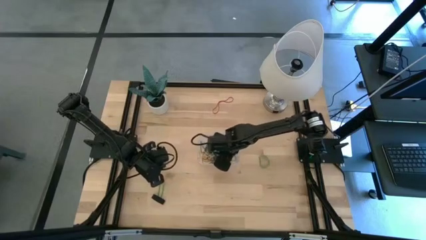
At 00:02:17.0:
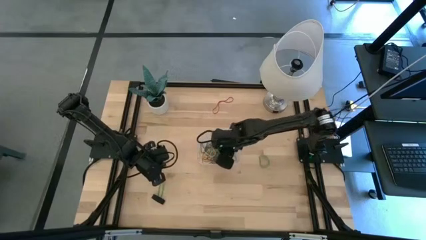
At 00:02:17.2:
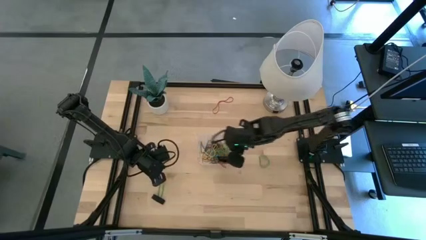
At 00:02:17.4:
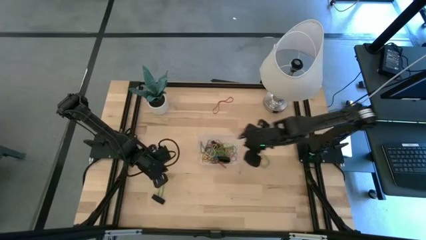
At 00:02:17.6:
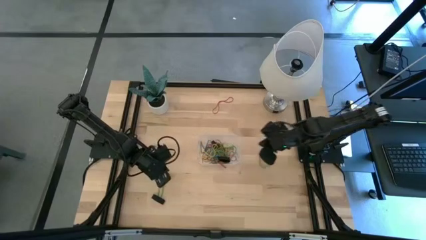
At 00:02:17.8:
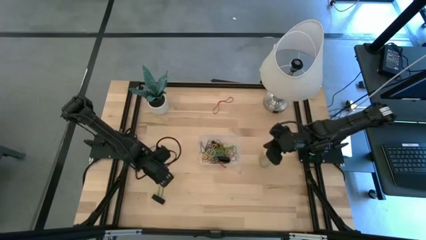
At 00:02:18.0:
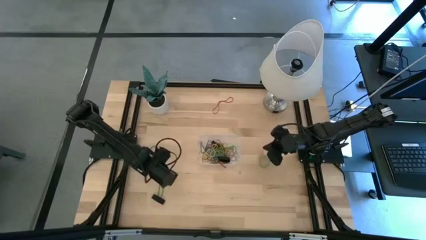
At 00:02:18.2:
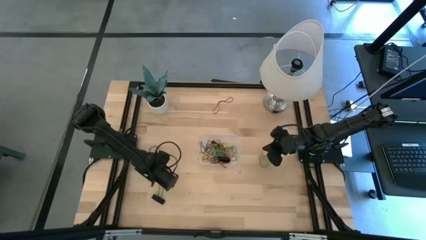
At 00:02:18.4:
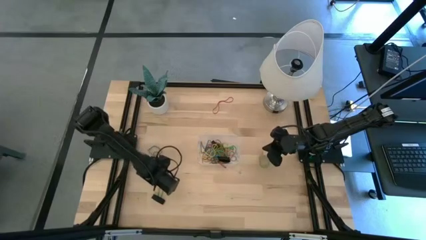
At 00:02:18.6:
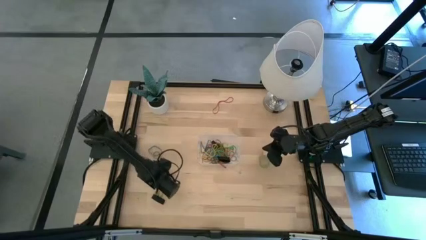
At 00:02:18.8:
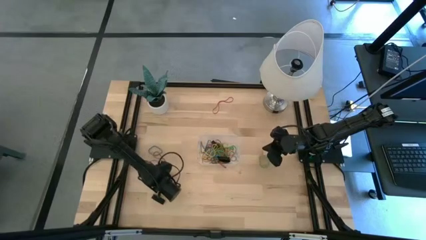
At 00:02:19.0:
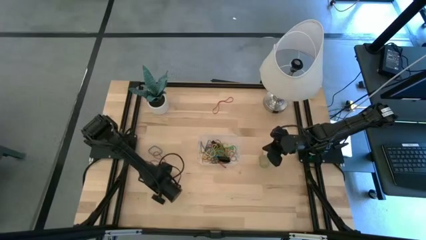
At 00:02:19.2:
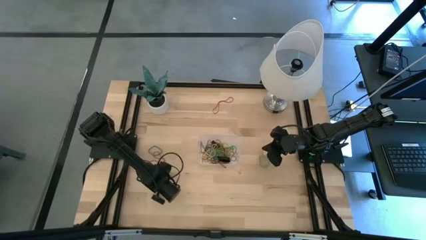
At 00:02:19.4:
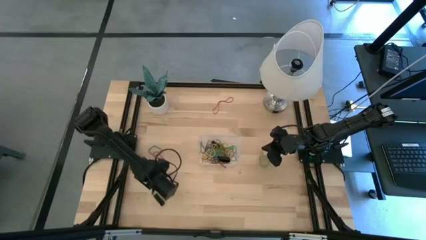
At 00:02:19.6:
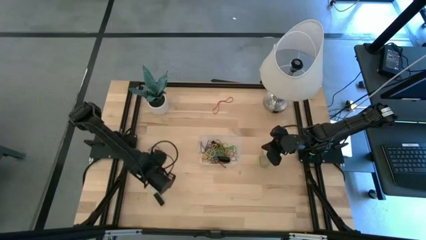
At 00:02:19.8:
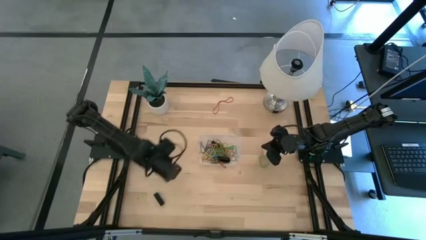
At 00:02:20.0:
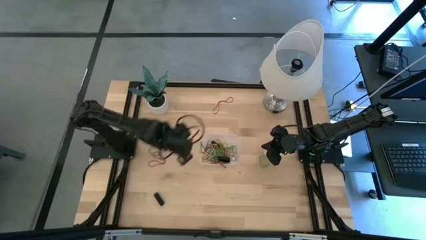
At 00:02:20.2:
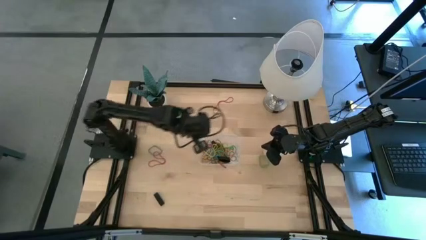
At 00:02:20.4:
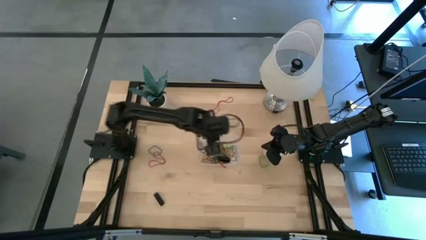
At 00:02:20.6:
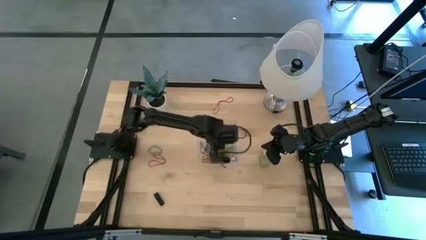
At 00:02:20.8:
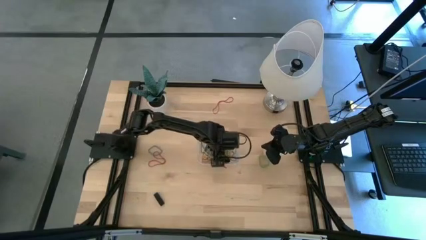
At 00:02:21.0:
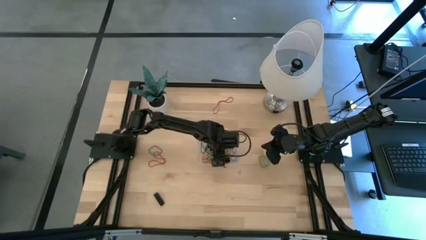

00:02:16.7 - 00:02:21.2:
Task: Pick and place rubber bands into bin
Put the green rubber band into the transparent bin

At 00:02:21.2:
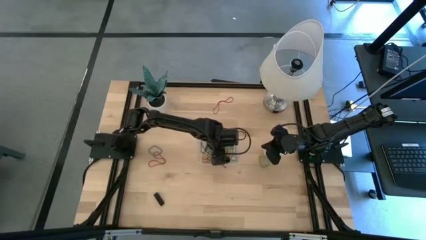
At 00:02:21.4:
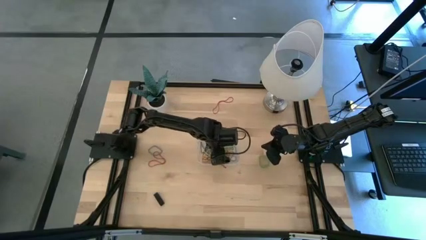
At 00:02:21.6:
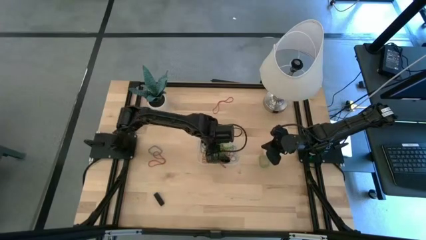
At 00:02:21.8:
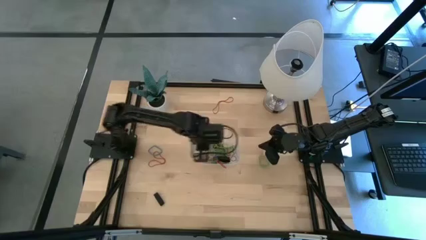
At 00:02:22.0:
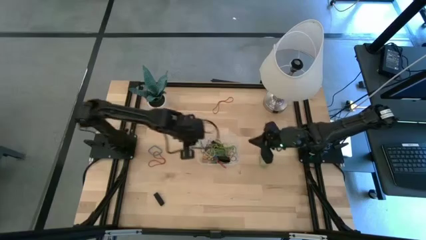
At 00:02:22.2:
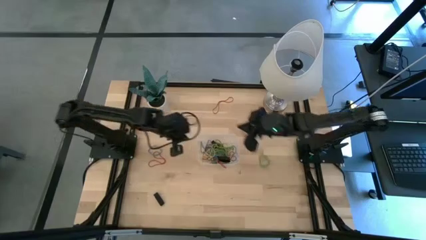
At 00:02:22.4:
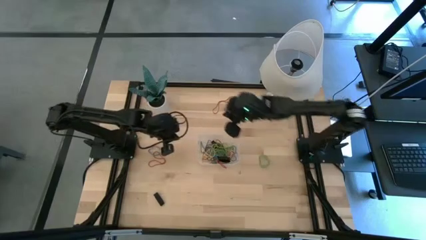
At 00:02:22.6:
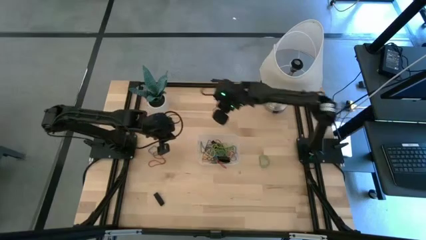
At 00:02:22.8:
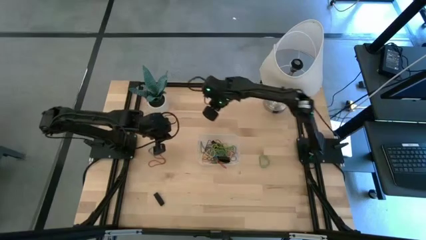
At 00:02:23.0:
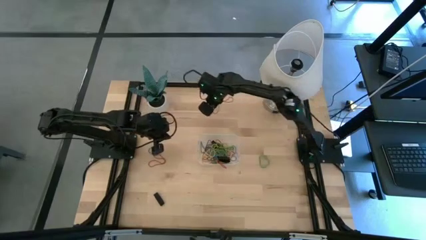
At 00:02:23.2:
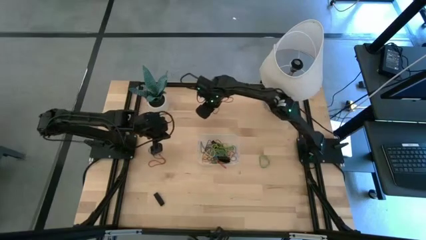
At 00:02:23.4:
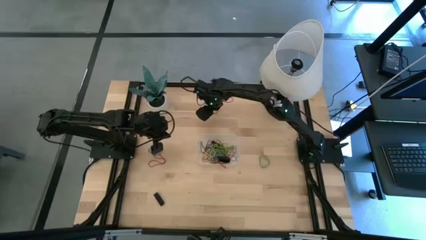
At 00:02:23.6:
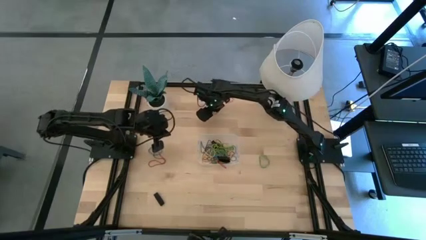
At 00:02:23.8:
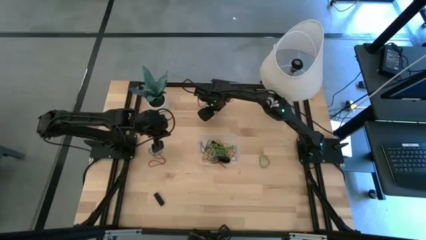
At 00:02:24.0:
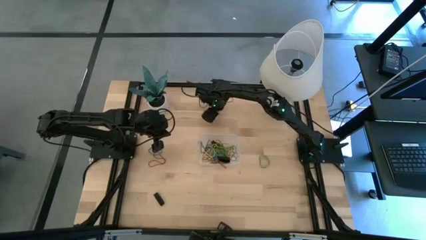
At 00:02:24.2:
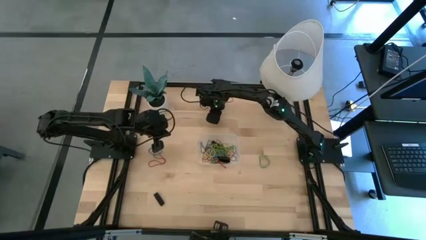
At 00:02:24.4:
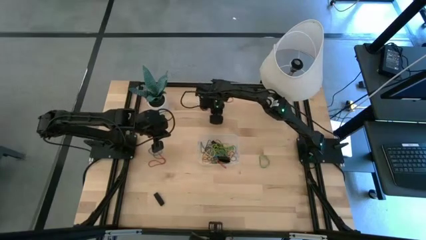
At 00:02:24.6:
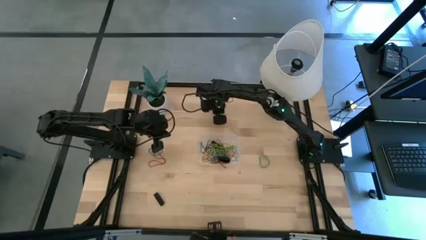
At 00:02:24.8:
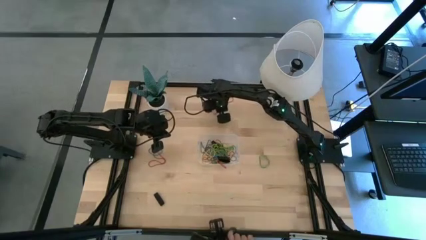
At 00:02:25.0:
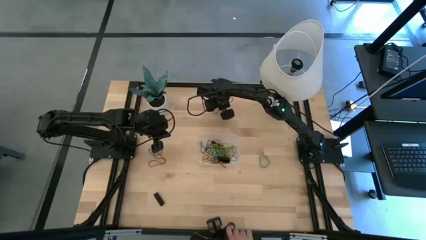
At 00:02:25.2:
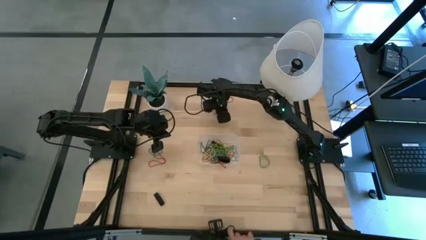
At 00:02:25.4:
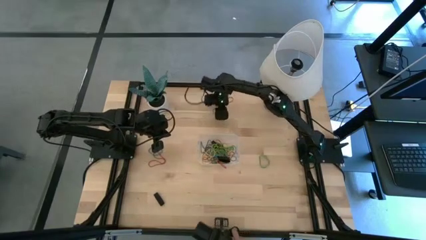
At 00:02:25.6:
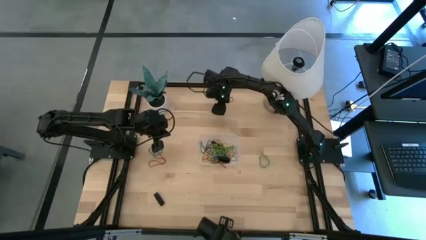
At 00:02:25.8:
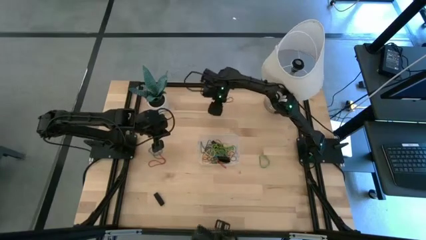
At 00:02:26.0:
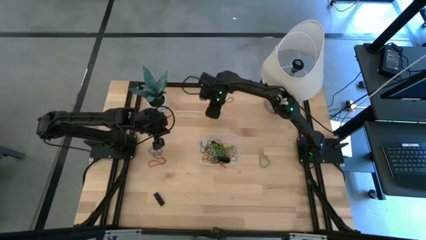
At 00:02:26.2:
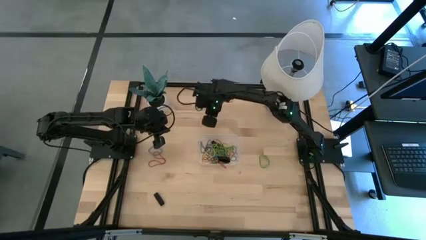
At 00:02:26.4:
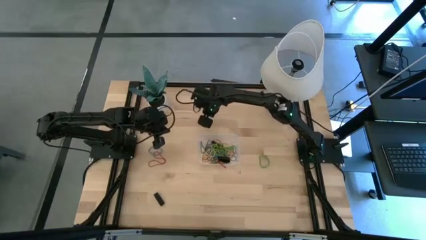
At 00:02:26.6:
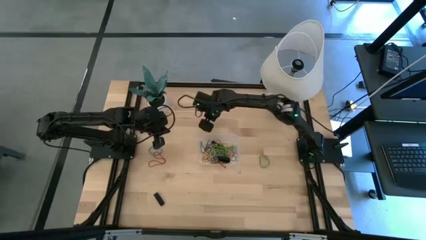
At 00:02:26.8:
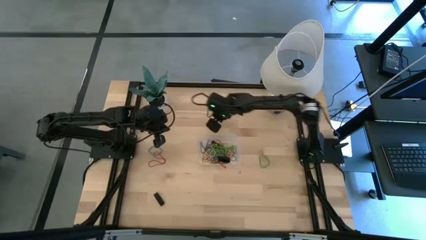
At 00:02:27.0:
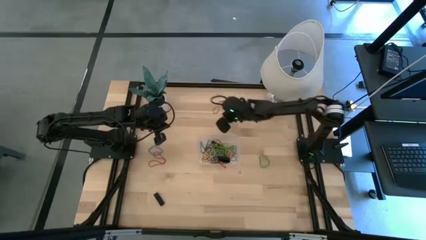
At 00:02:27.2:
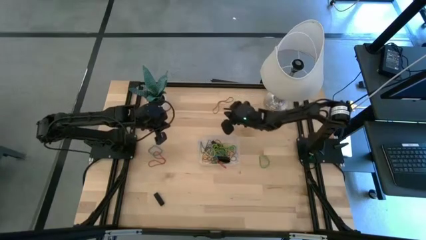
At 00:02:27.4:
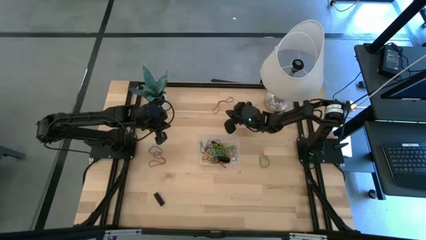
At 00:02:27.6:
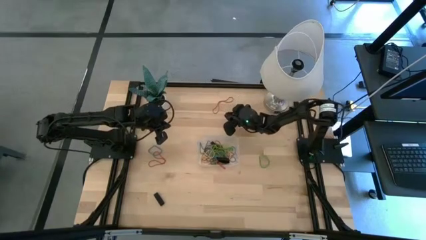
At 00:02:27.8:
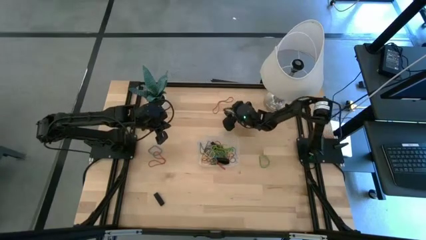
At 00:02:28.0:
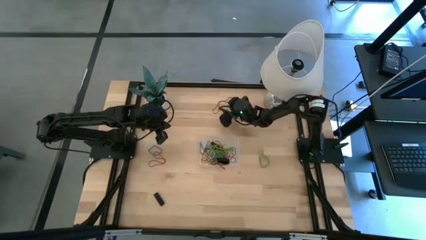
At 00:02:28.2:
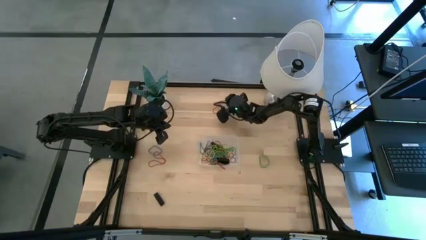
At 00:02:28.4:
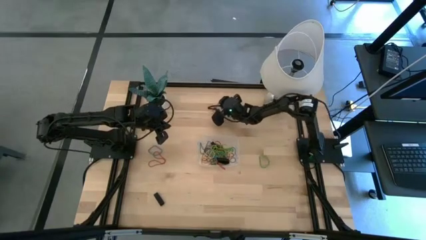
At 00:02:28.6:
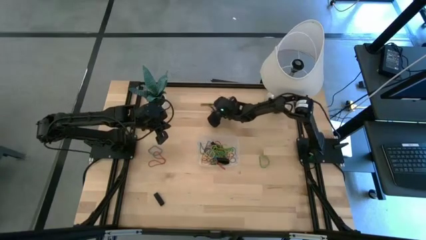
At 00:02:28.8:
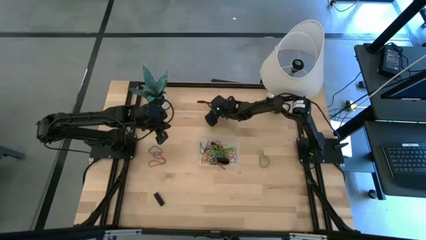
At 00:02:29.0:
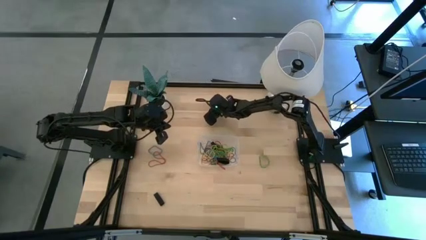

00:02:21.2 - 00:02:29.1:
Put the red rubber band into the transparent bin

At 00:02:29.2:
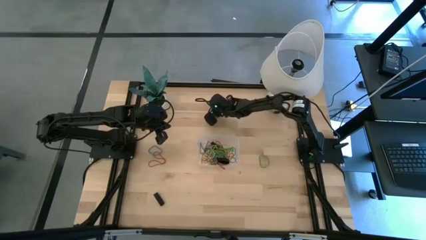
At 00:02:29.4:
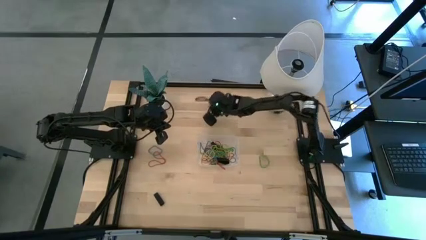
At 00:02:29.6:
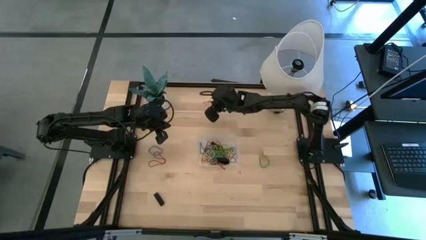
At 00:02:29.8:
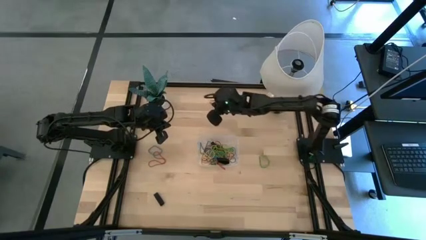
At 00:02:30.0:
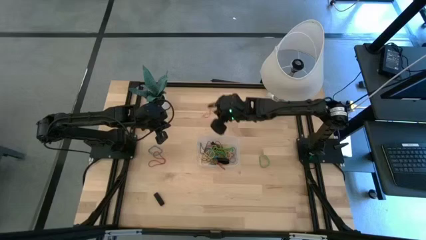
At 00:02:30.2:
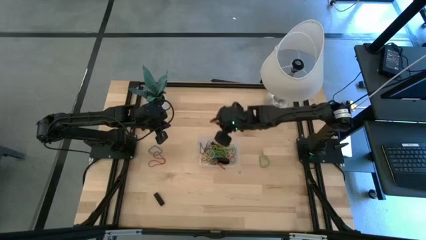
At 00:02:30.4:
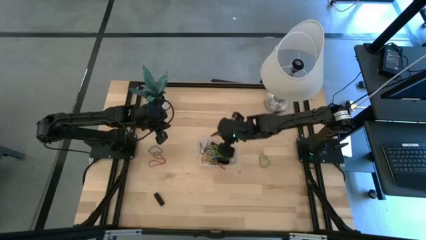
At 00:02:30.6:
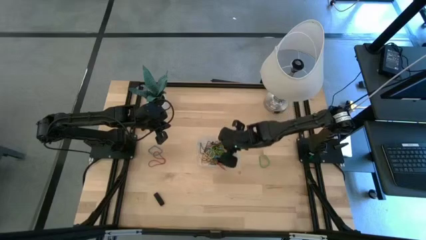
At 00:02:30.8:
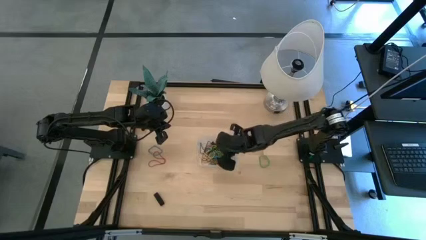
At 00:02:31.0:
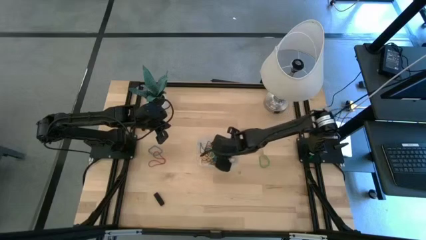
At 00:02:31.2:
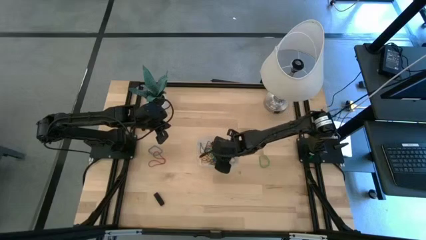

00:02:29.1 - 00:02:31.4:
Put the red rubber band into the transparent bin

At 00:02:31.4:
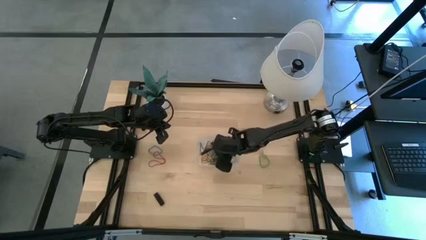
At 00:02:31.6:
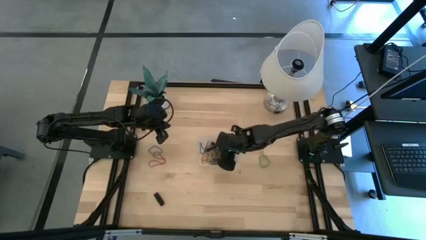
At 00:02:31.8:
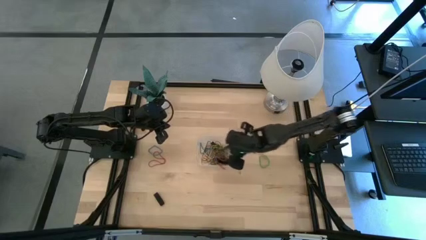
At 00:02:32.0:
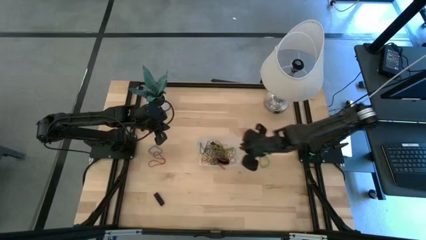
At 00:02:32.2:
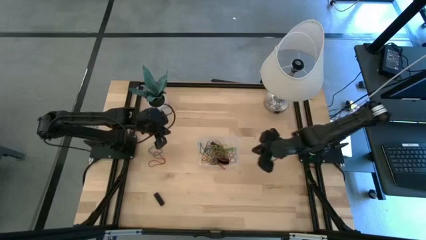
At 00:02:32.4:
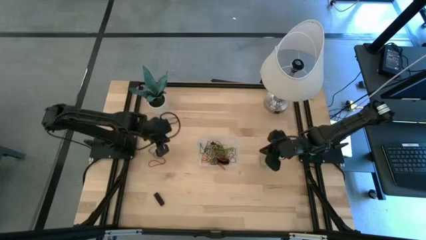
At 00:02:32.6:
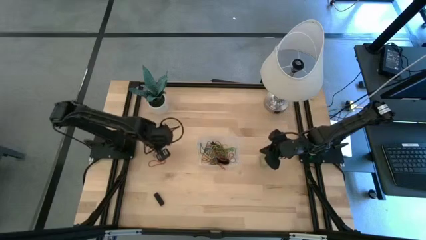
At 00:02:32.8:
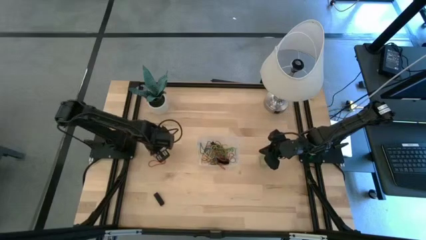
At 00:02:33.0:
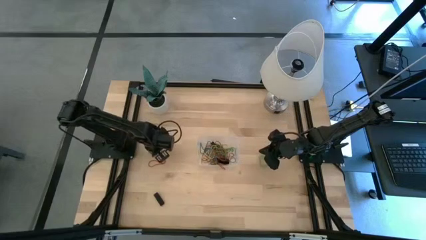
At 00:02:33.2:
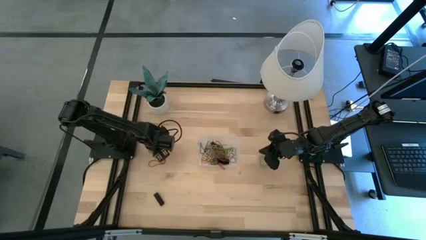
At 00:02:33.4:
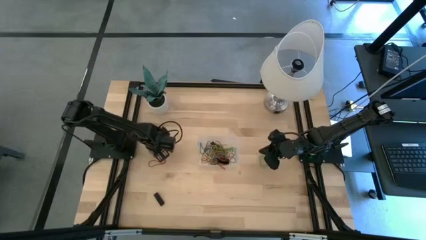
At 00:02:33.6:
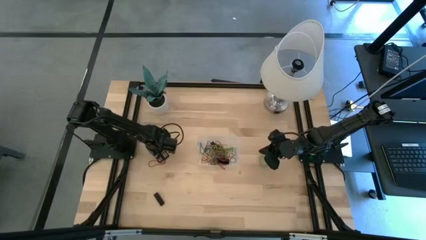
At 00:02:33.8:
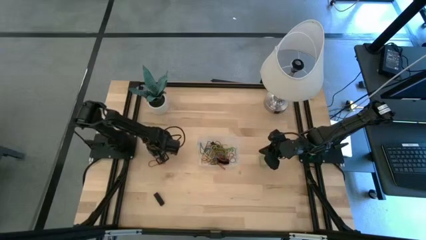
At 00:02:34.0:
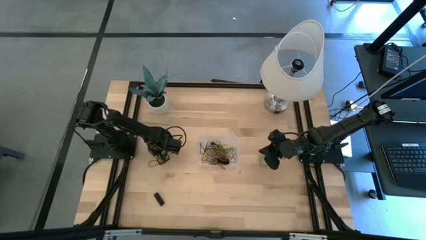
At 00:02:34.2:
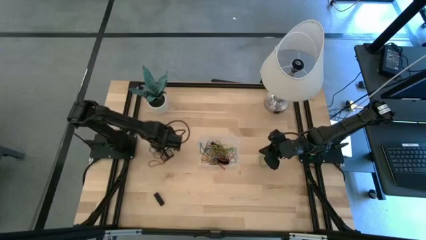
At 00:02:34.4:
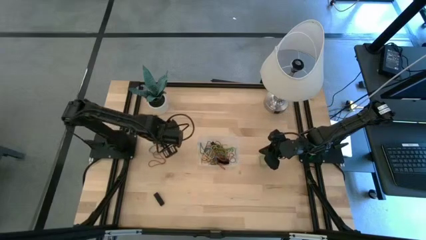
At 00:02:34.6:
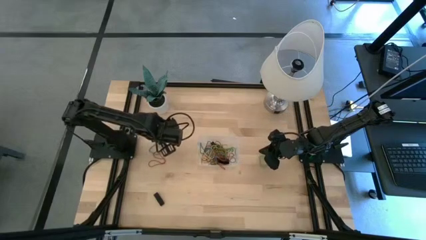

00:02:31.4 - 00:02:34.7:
Put the blue rubber band into the transparent bin
